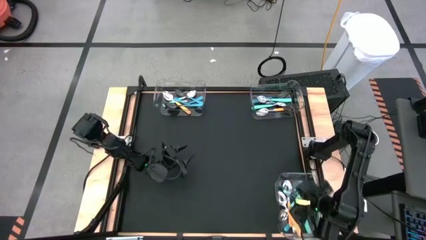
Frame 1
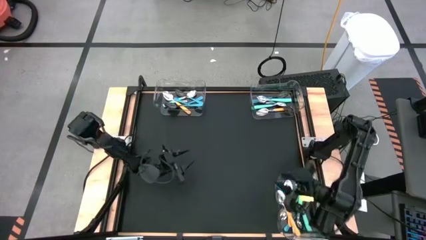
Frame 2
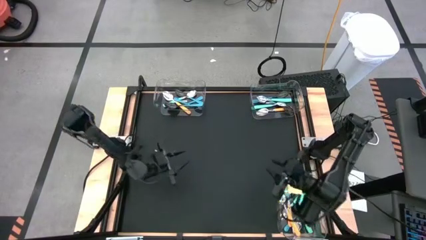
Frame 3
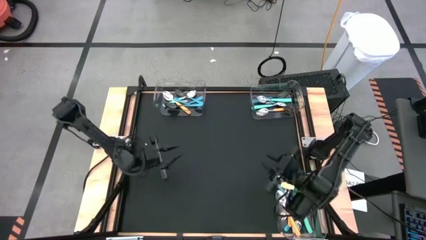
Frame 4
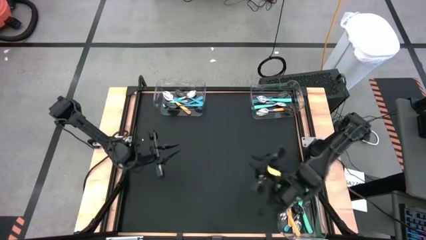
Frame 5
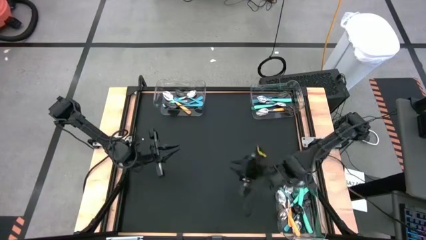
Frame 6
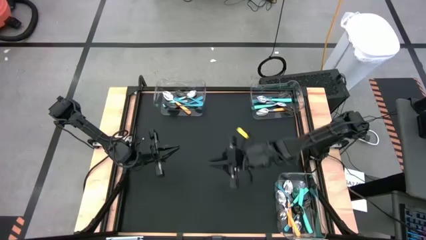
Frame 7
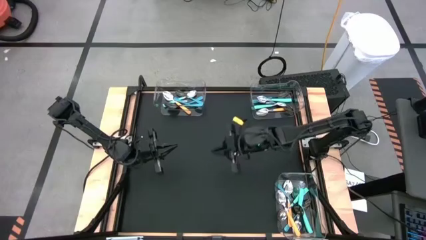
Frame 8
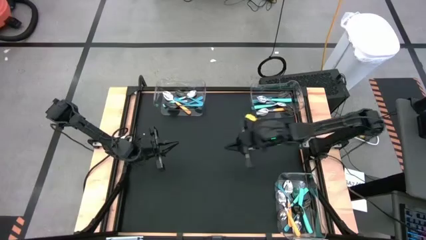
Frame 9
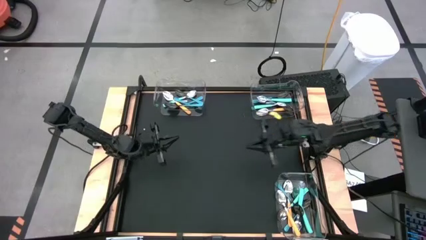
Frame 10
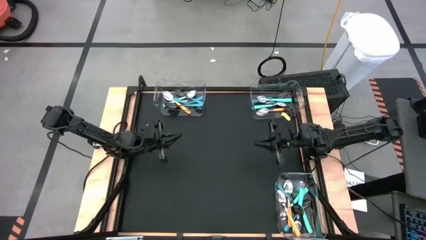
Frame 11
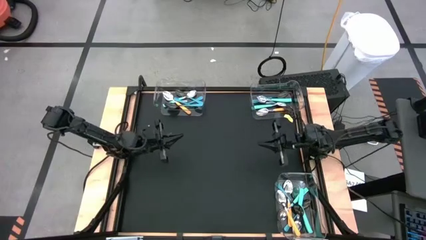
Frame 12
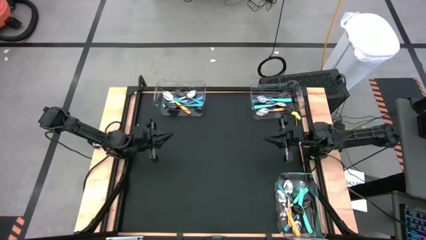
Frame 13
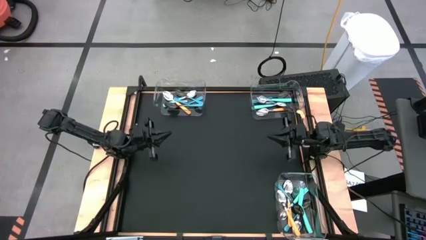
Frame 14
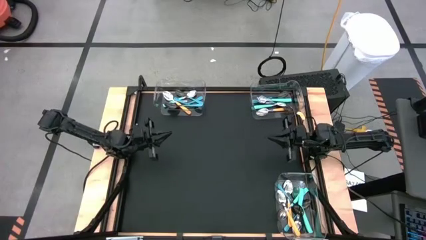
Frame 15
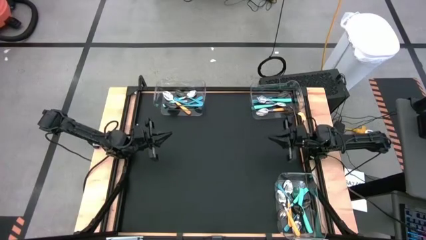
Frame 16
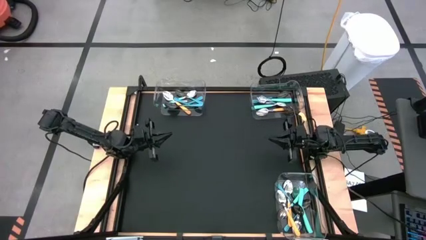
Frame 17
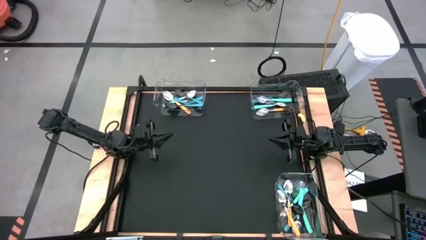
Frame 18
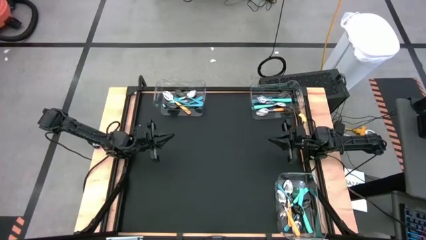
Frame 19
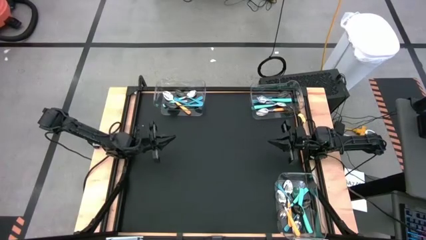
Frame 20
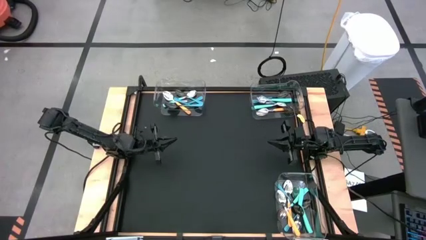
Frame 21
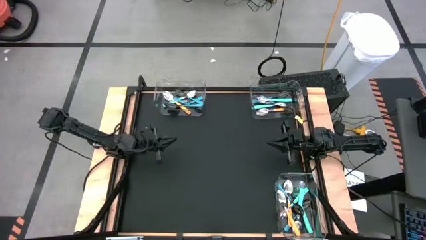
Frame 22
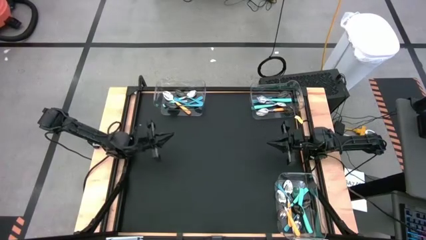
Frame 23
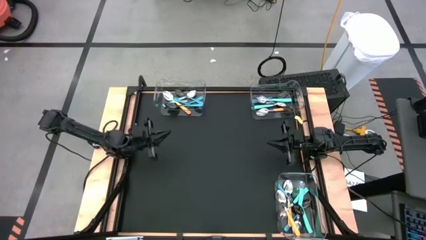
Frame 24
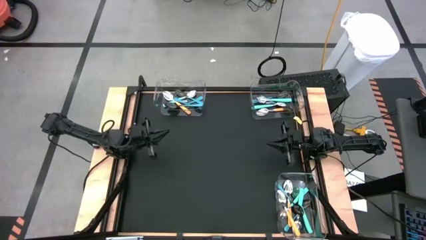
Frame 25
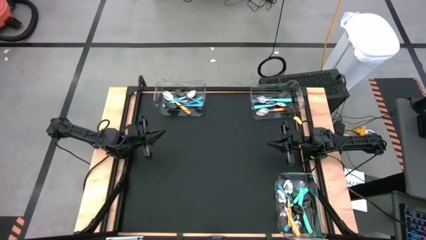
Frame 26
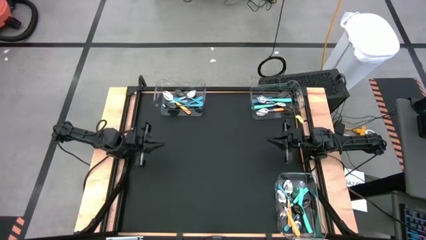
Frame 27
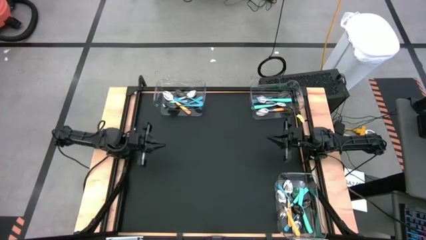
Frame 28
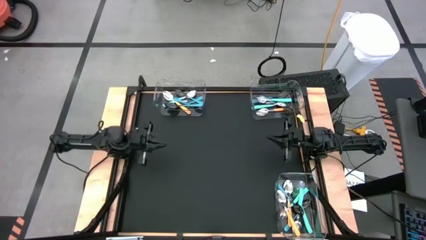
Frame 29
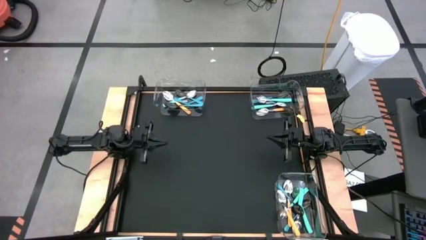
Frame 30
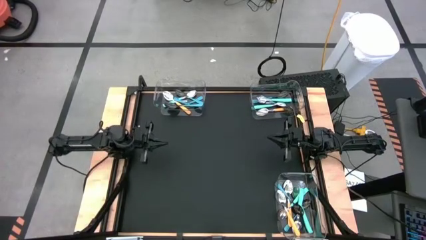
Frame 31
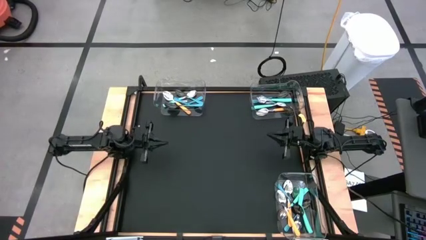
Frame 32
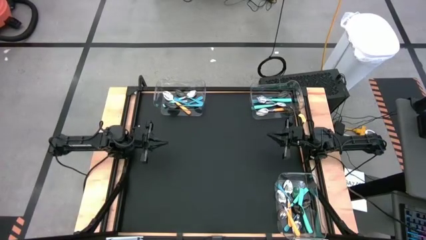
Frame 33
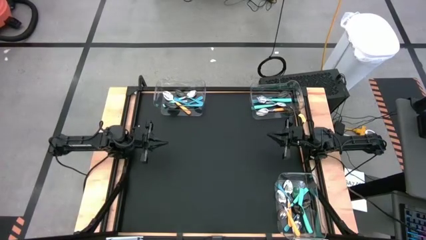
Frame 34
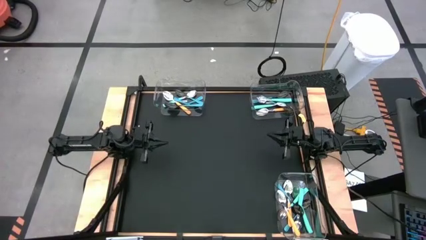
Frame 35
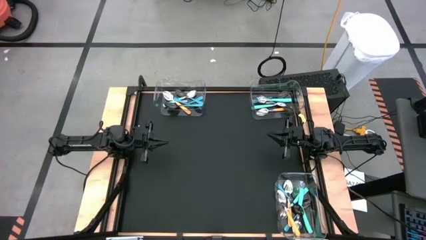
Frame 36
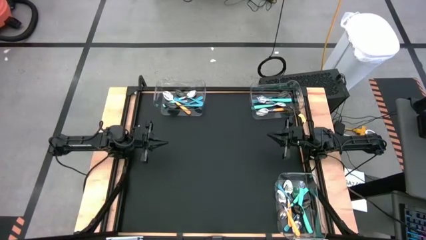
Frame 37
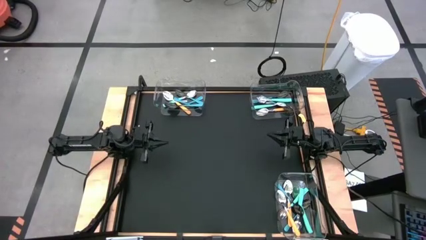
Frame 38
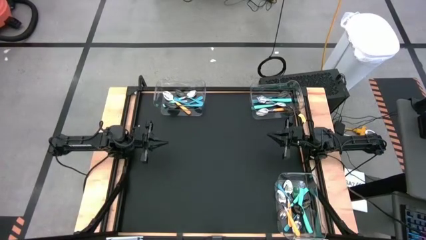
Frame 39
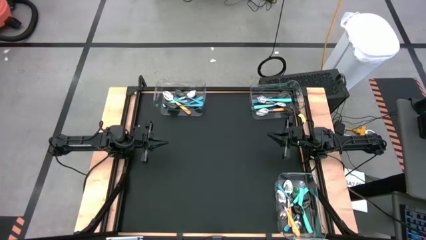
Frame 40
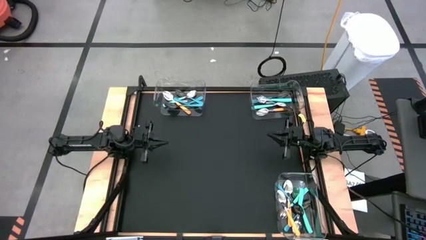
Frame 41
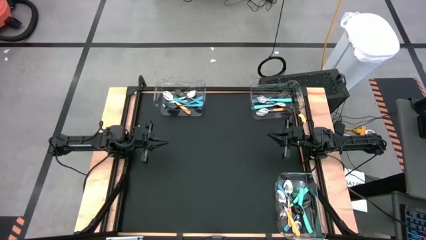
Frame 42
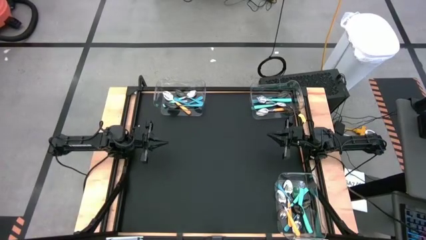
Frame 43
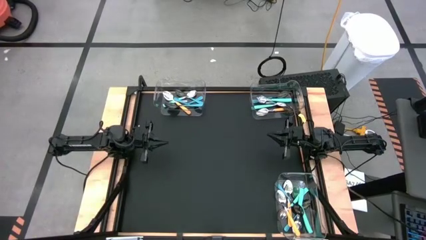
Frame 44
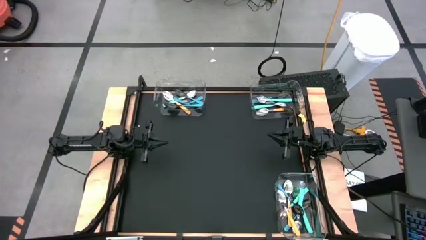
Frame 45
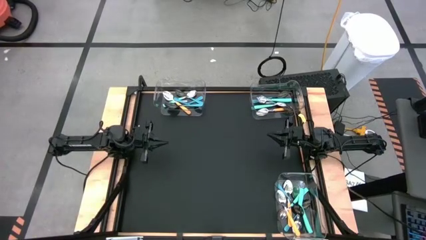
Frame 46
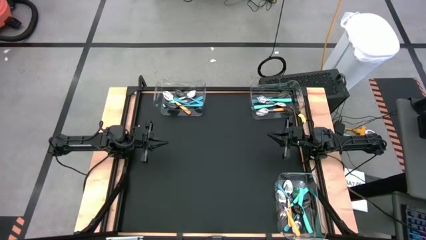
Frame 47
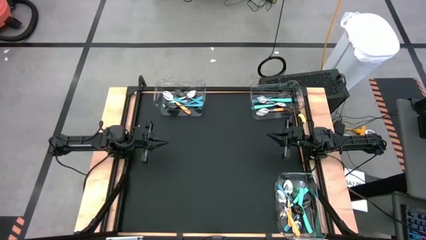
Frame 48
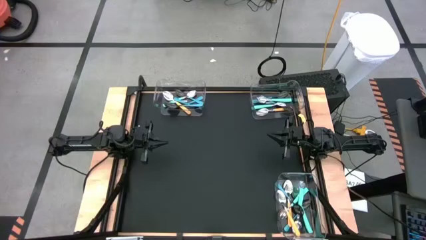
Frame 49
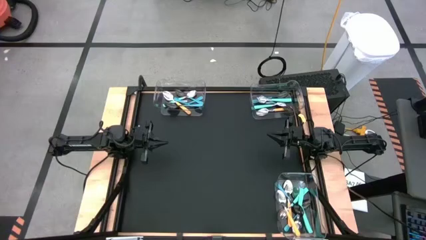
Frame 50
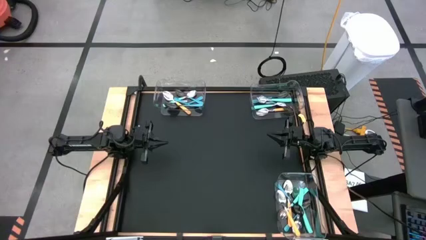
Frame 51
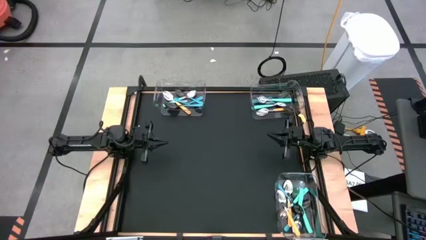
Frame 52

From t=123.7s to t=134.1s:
Task: Sort silverware by color (type)
Return to Home Position

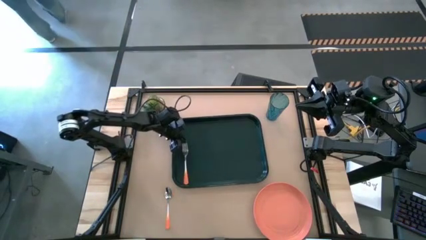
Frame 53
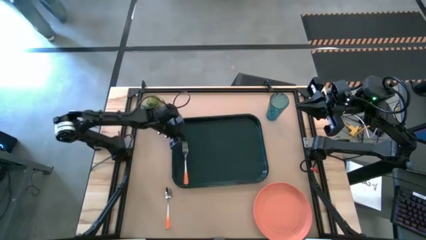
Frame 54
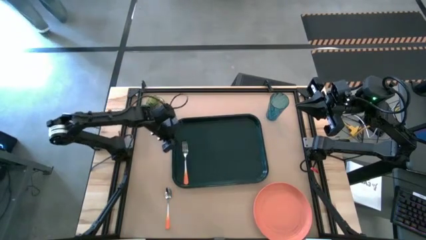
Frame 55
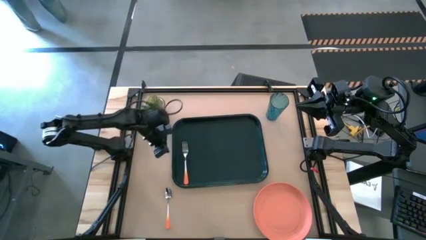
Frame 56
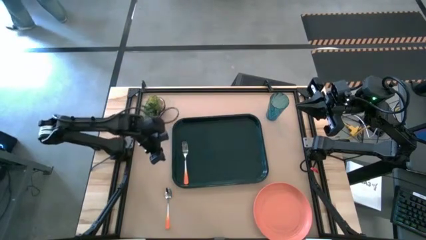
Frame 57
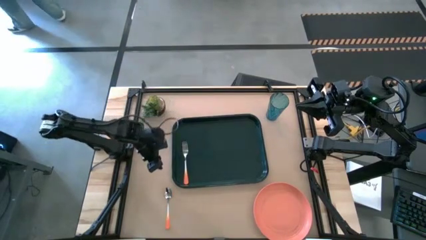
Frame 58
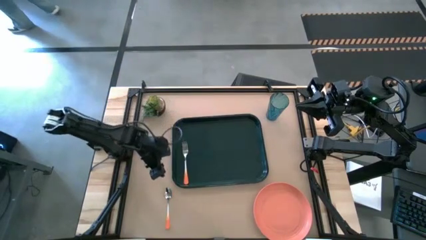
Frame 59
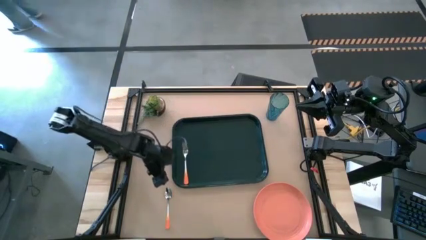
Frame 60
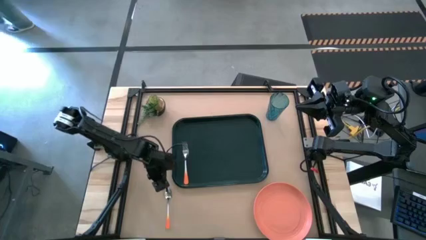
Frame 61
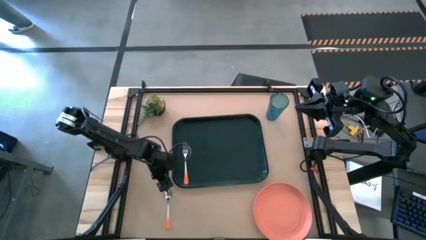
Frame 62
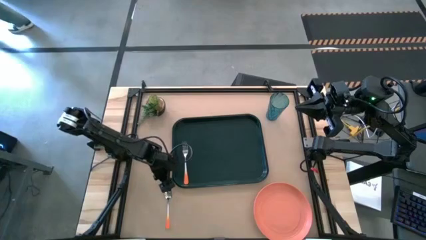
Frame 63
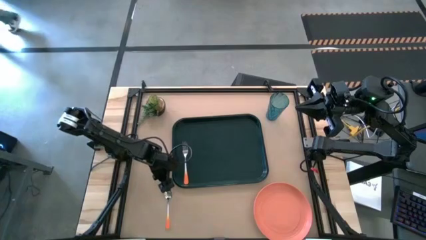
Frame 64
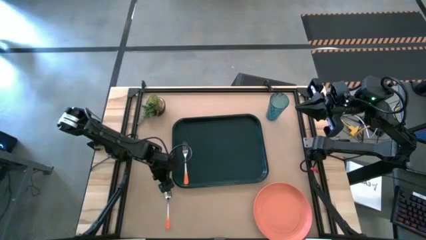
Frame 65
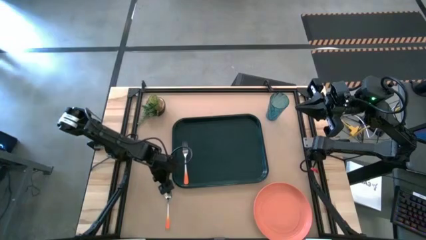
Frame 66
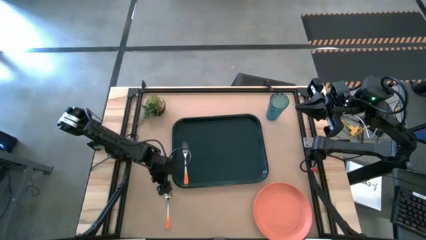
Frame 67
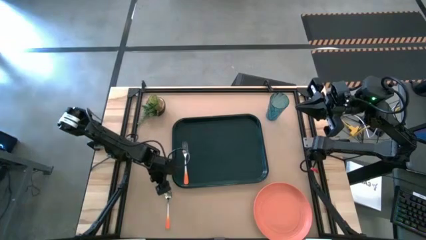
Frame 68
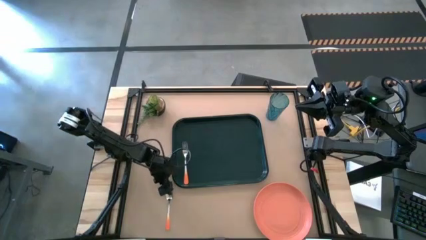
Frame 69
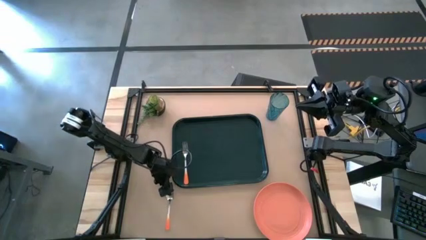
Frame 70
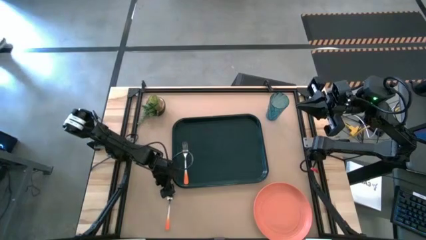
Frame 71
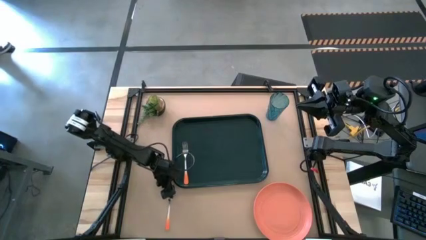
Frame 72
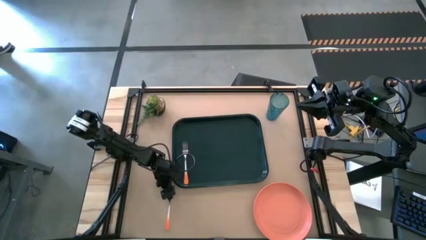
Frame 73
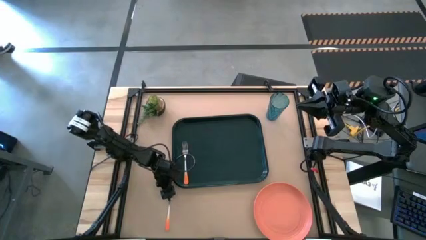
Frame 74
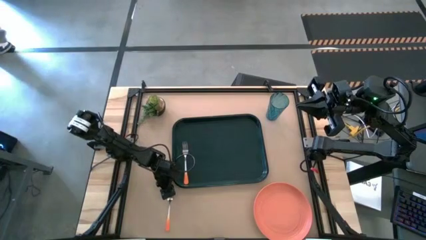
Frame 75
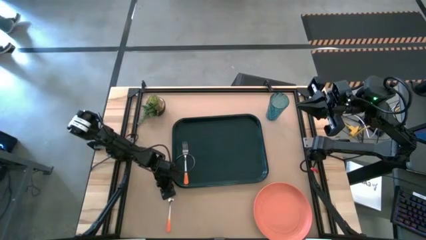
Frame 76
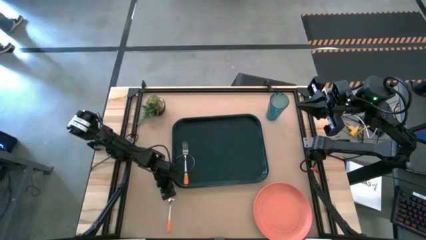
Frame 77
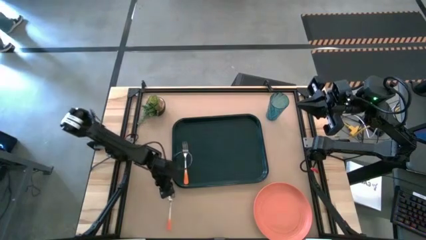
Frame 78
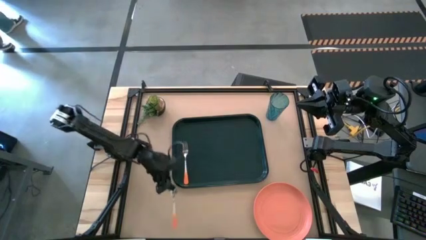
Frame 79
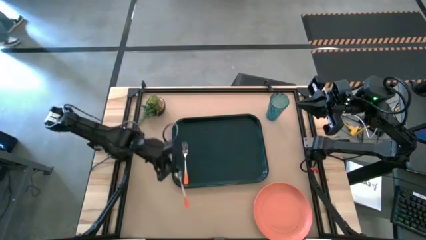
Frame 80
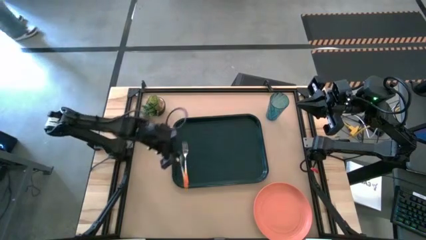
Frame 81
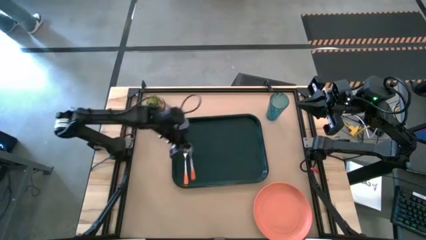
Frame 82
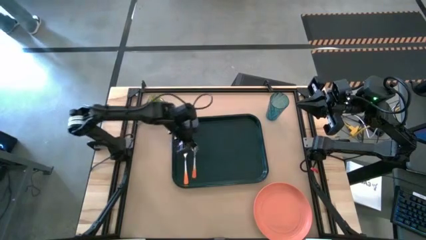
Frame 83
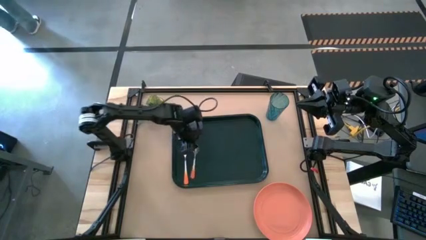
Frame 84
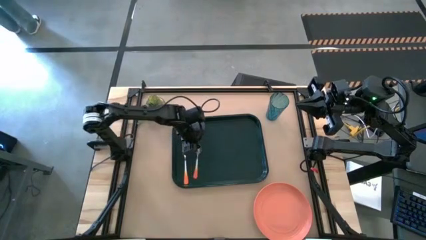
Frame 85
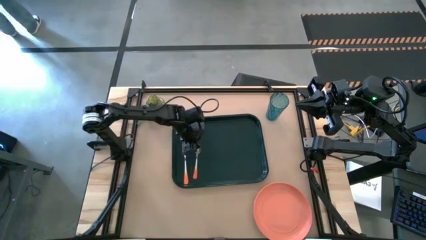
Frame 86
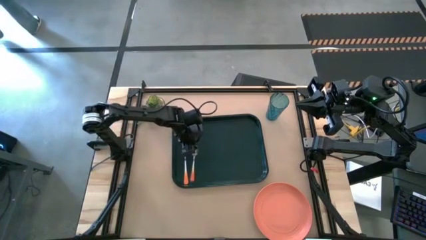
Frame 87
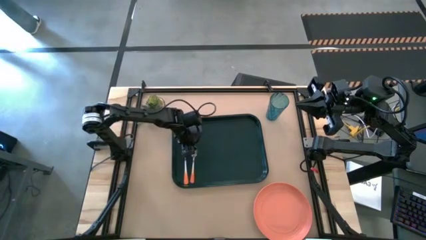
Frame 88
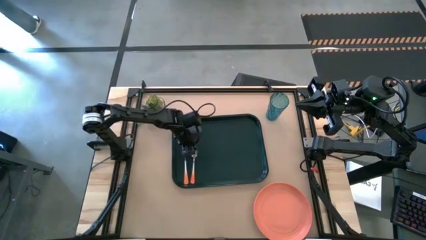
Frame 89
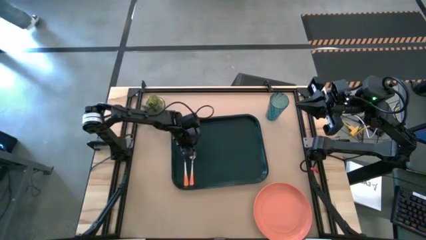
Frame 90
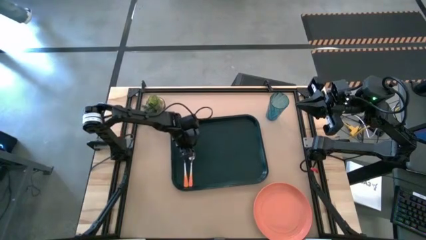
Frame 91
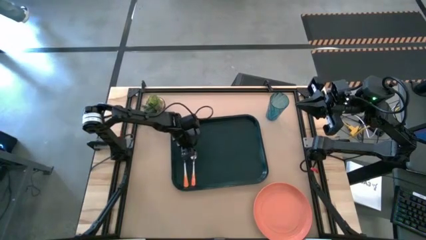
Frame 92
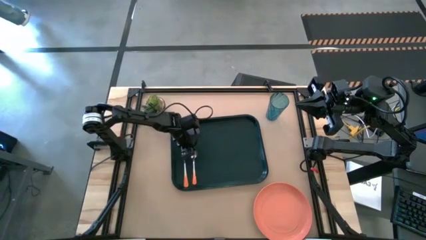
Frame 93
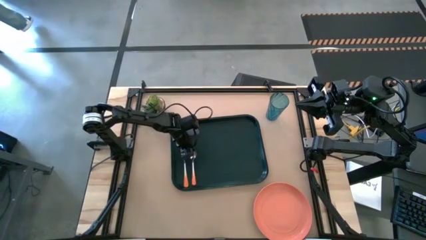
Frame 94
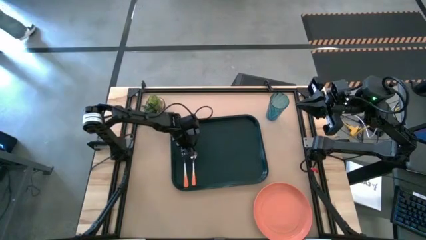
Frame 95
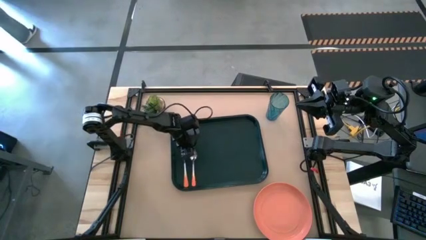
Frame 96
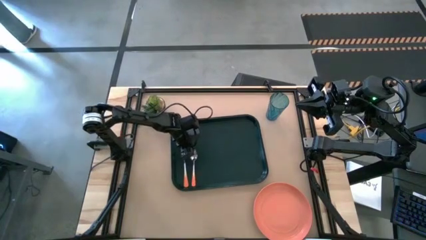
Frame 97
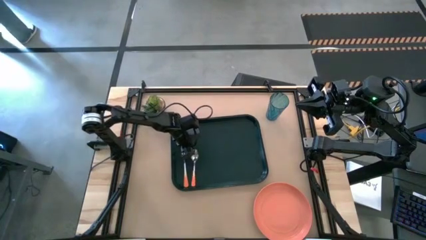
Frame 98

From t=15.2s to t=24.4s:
Task: Pick and place plate/cup/fork/spoon on tray
Put the orange spoon on the black serving tray to the right of the orange fork
